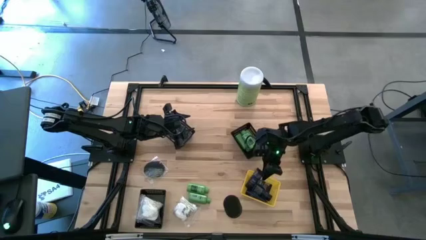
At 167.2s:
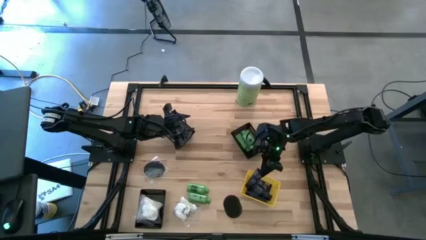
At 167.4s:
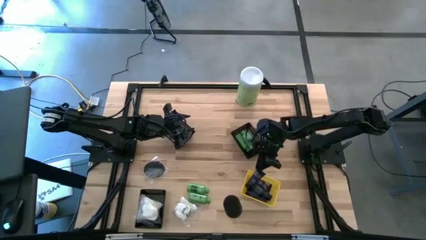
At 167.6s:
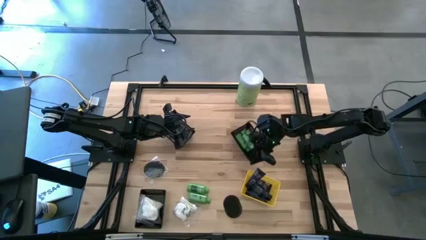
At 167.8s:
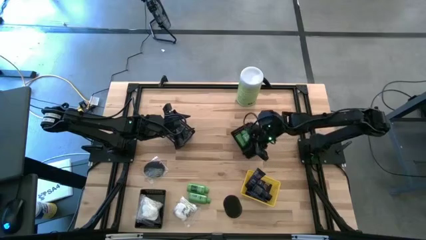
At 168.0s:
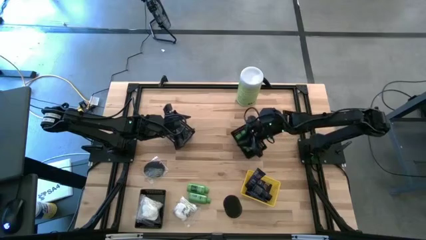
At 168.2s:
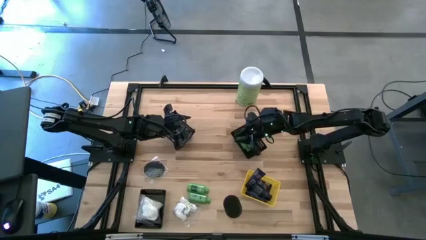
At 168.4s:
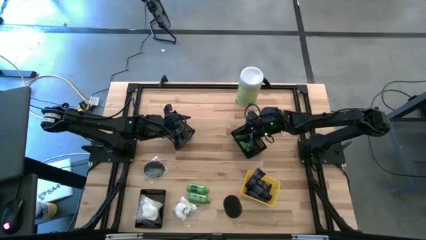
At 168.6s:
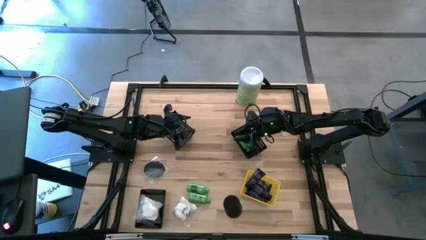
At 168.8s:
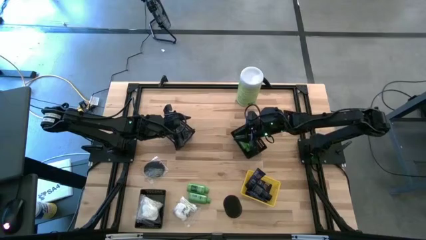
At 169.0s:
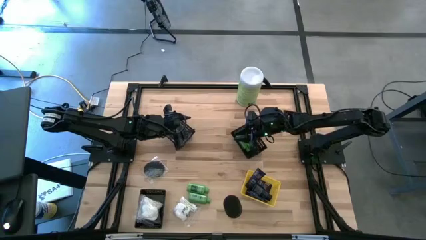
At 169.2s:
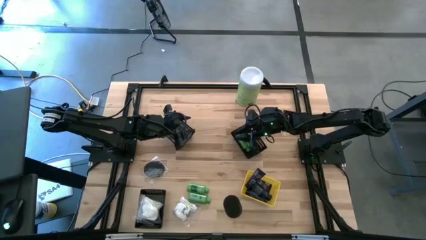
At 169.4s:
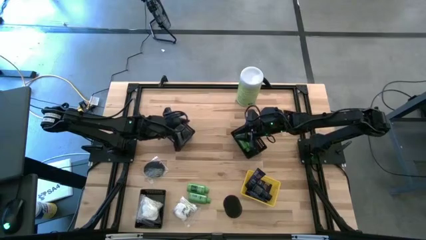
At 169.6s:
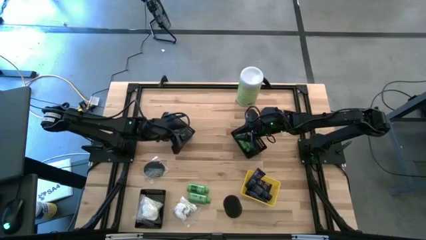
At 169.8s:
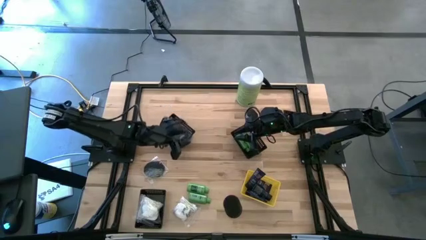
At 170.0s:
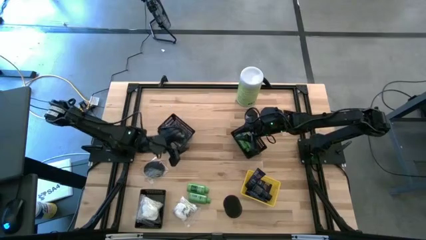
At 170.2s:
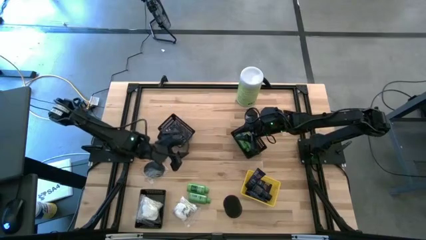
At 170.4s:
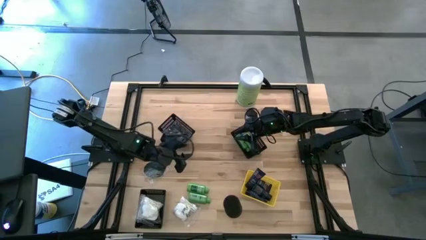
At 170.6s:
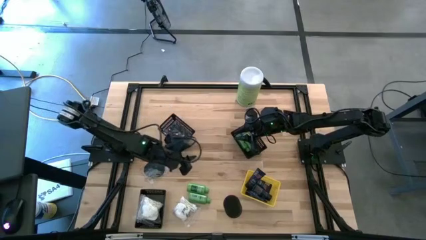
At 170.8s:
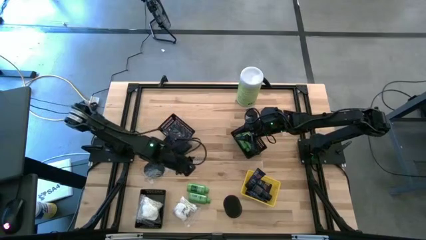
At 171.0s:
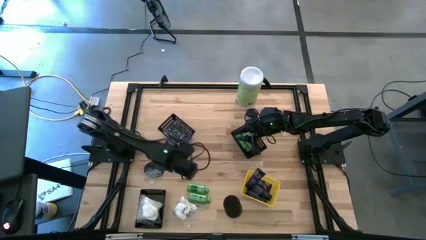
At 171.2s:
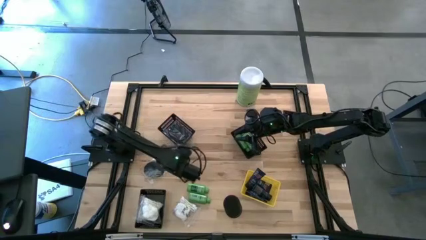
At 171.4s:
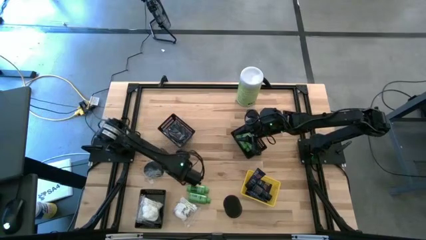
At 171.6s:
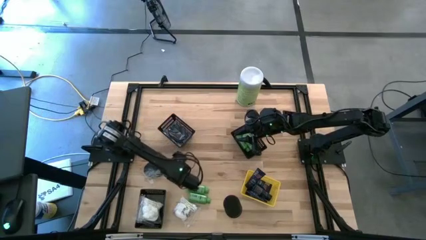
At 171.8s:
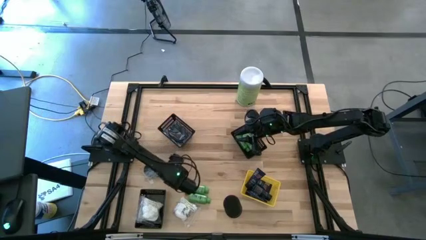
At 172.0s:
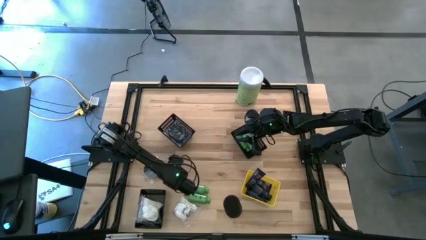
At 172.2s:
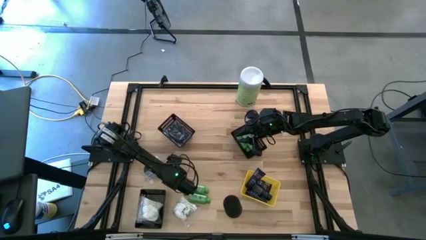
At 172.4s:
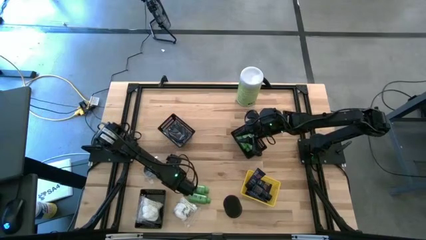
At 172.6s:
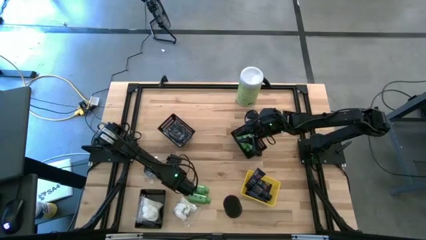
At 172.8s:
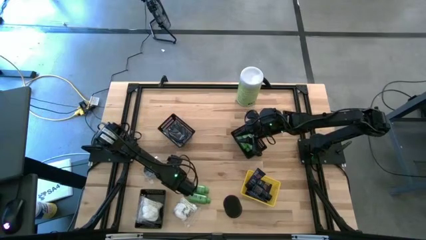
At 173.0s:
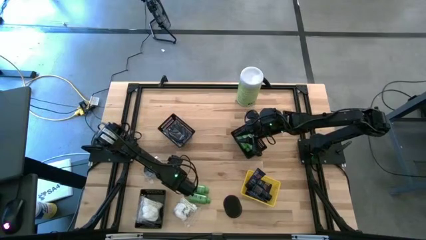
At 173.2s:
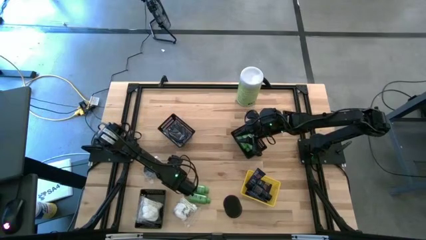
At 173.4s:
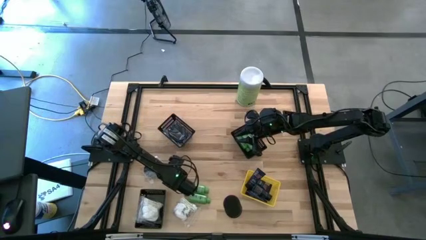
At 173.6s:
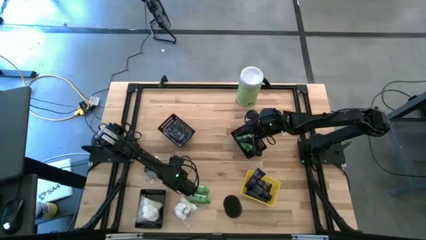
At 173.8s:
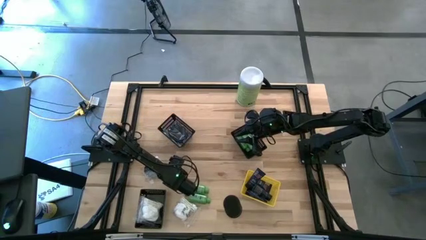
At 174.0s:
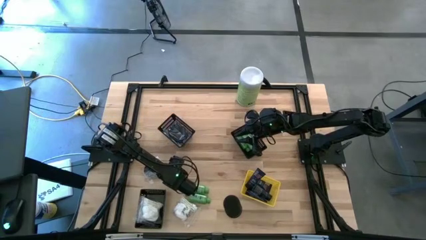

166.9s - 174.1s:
Task: Pick & Place Travel size toiletries
Put the hairbrush into the top left black bin

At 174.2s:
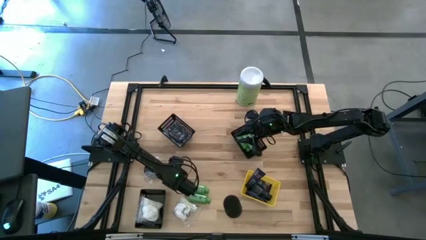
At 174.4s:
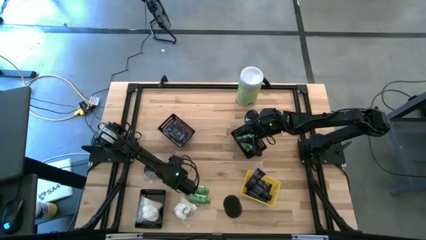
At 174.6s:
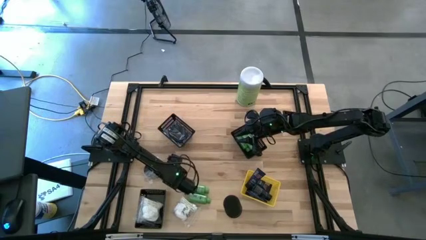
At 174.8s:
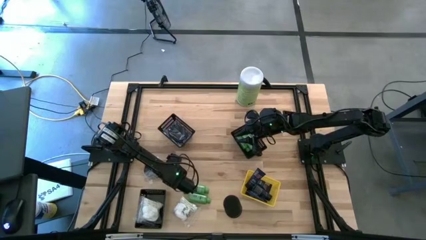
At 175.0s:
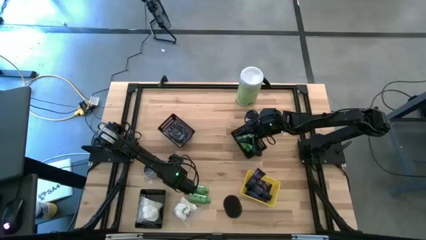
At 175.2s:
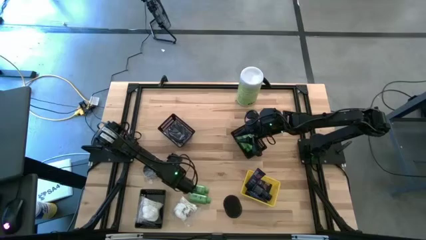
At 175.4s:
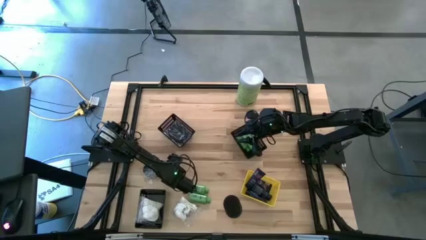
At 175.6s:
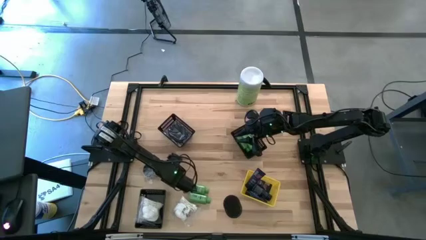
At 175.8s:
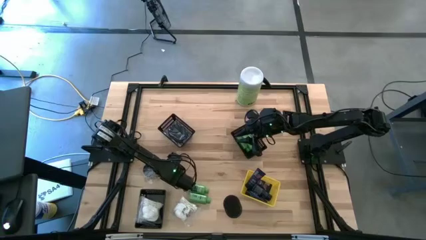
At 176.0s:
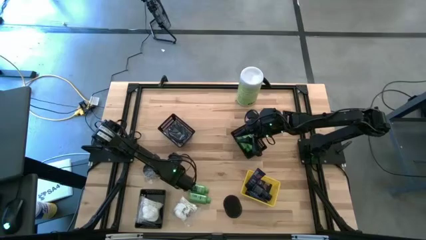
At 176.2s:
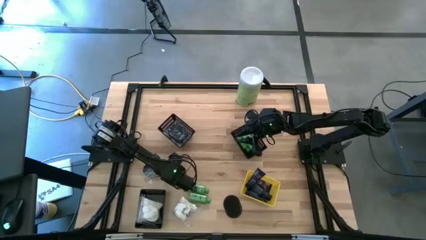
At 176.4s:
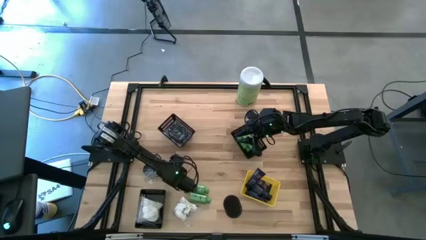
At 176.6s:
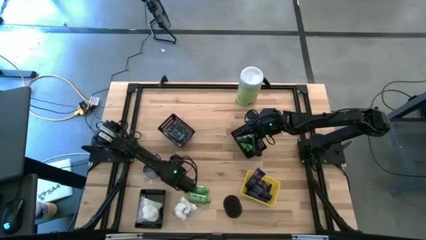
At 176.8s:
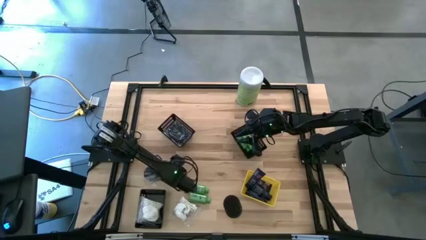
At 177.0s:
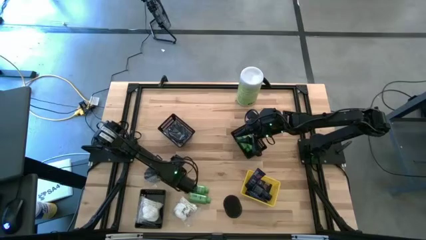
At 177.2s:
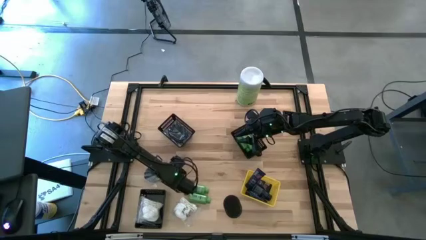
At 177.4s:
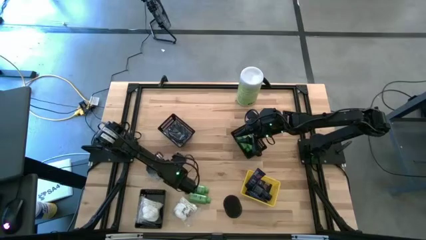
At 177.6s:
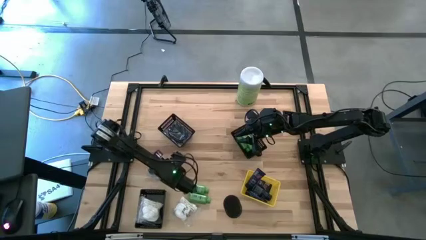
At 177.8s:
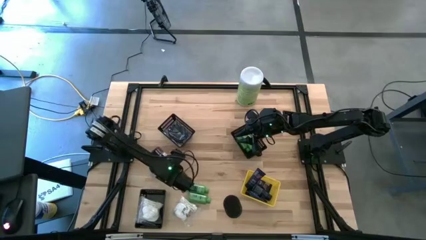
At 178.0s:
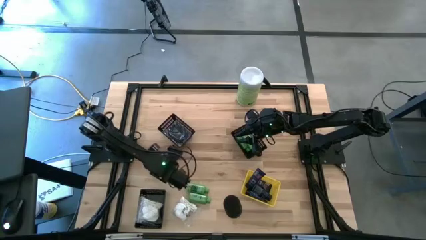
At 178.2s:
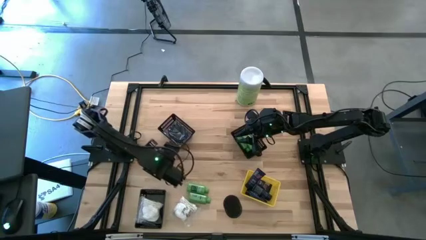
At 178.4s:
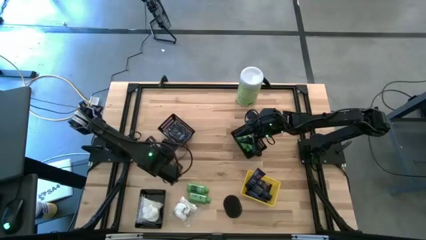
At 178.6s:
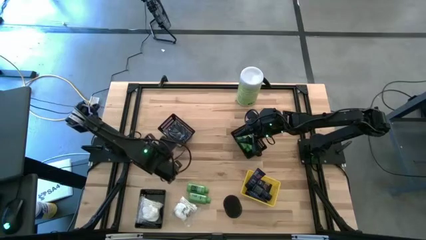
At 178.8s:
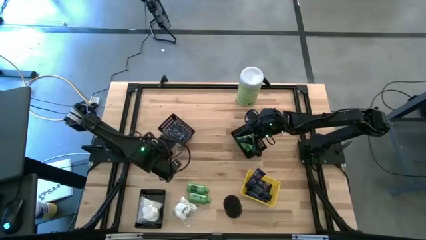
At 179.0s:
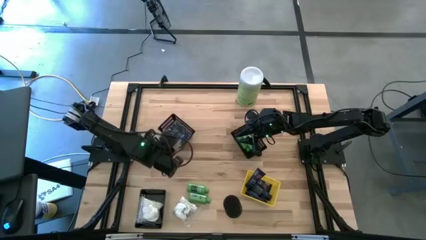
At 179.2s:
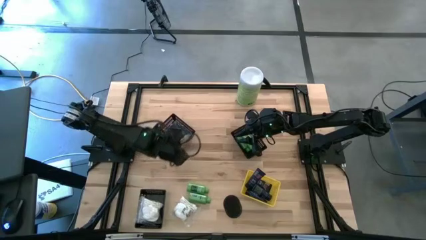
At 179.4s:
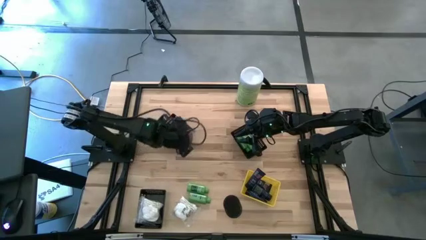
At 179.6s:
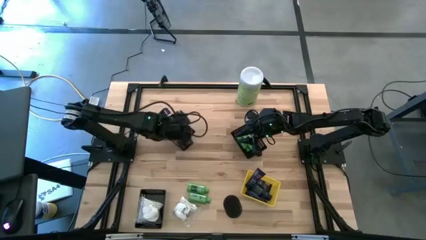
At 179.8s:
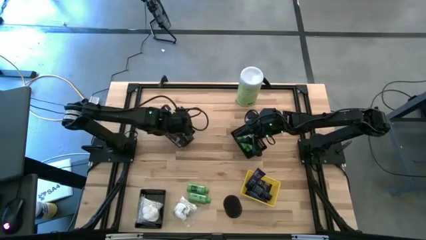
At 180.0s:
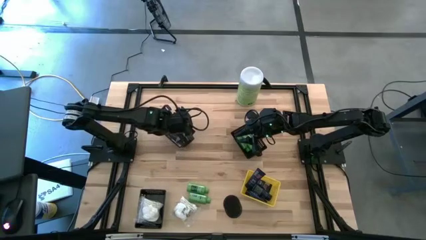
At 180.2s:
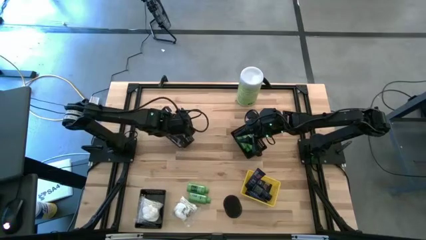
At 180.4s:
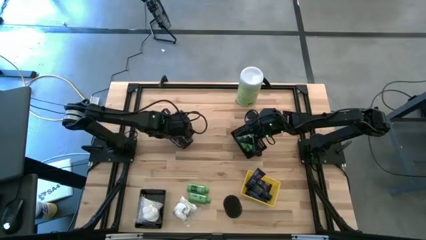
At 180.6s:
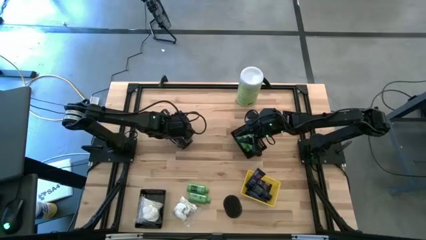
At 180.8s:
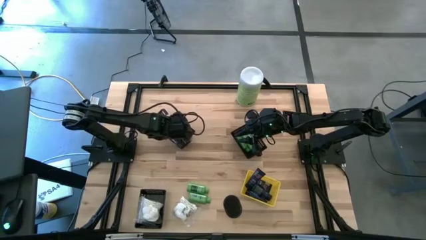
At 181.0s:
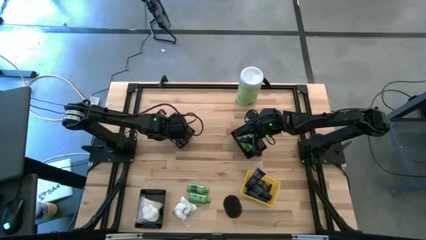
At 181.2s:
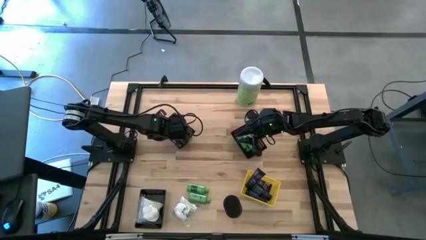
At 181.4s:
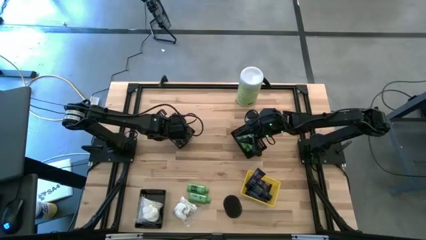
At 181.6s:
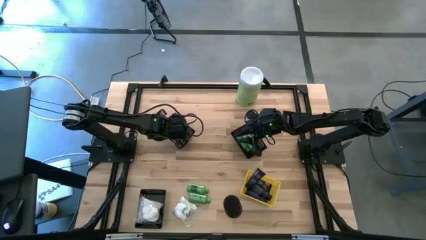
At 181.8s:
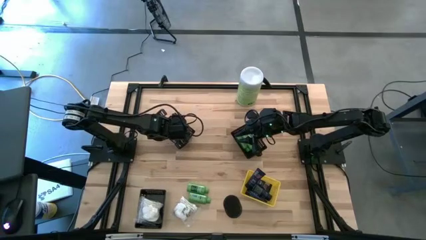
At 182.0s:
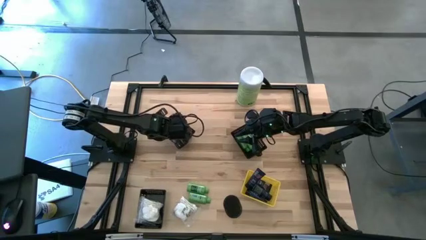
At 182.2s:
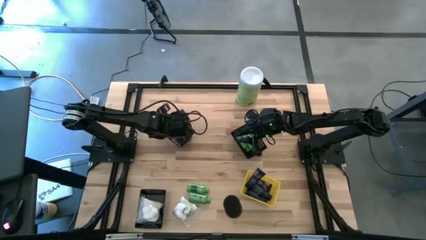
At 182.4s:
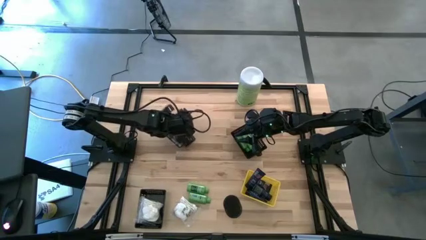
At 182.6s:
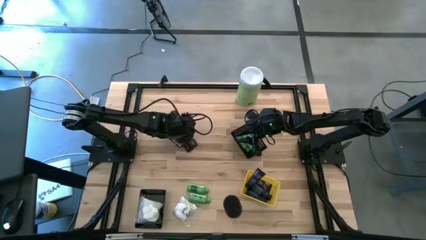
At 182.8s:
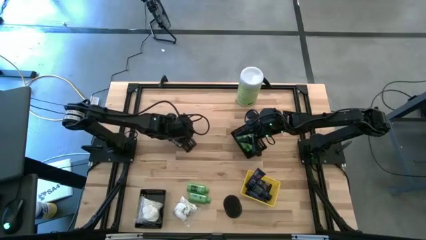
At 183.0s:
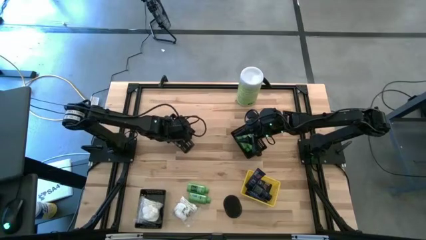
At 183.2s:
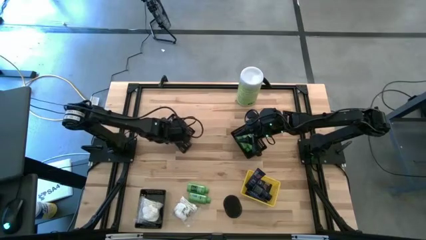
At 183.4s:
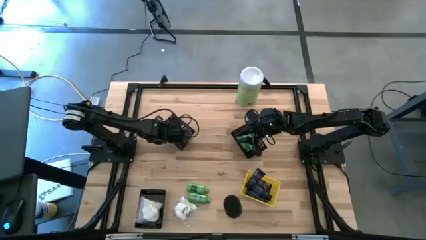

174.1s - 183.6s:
Put the hairbrush into the top left black bin
